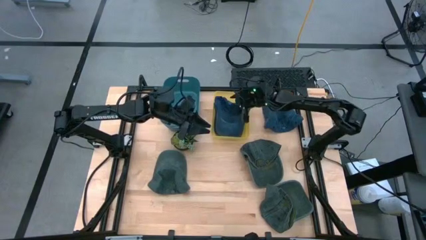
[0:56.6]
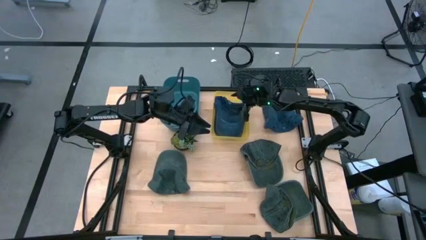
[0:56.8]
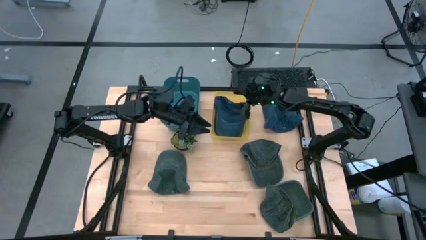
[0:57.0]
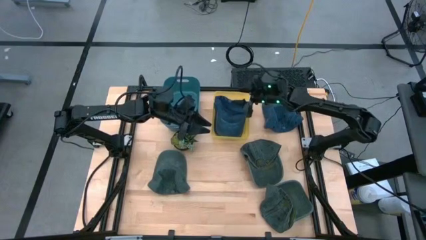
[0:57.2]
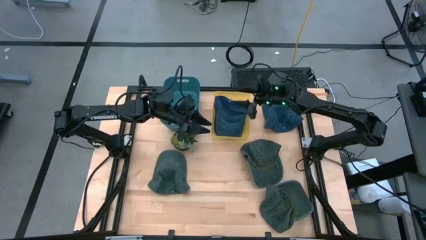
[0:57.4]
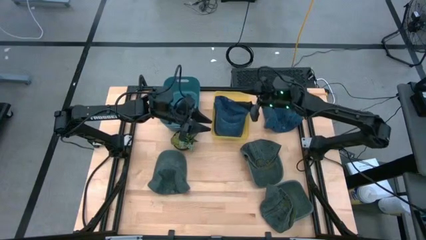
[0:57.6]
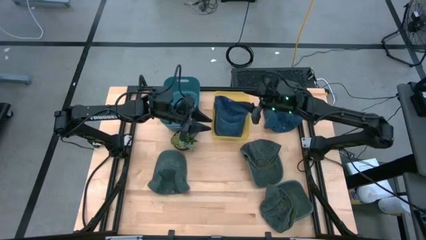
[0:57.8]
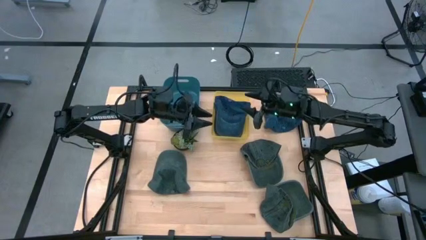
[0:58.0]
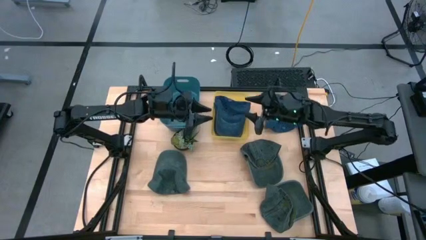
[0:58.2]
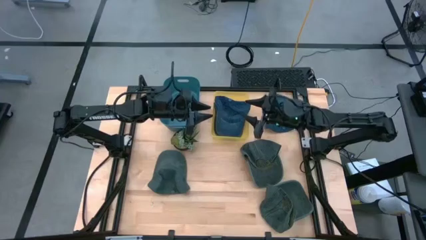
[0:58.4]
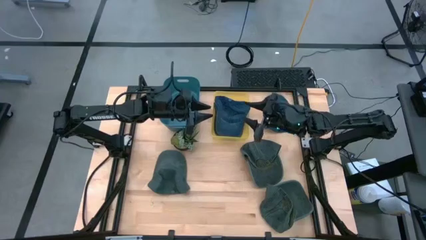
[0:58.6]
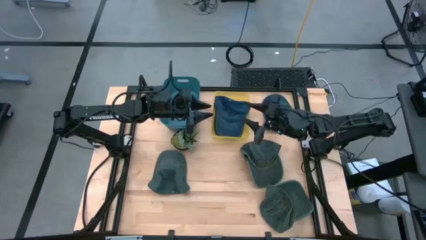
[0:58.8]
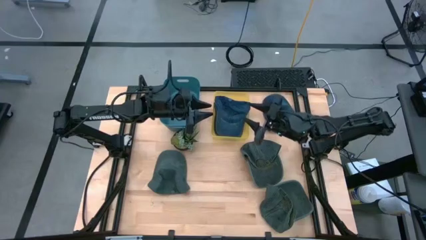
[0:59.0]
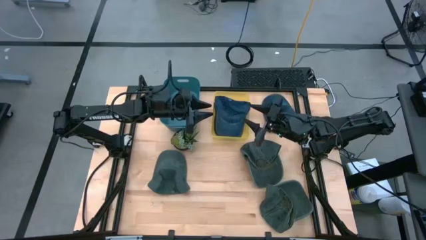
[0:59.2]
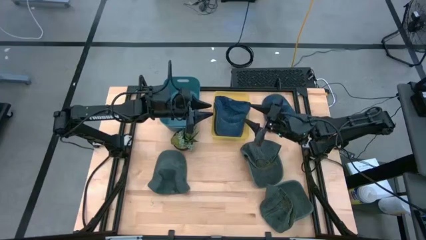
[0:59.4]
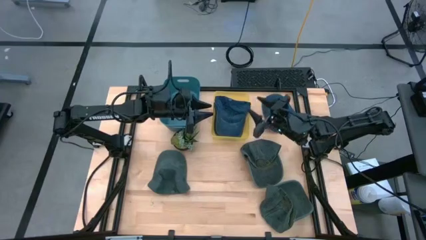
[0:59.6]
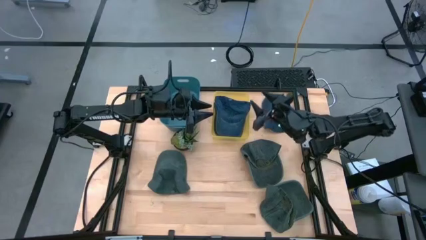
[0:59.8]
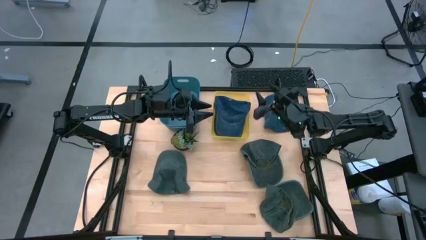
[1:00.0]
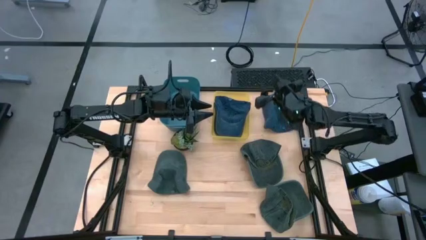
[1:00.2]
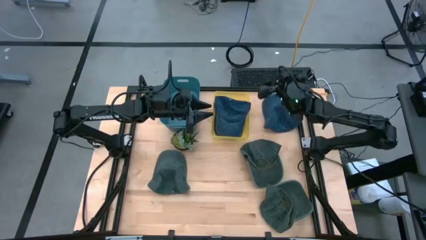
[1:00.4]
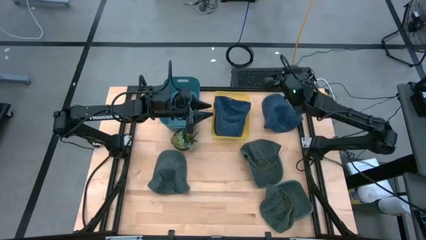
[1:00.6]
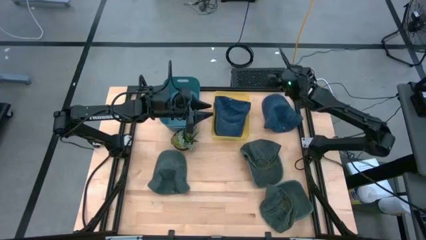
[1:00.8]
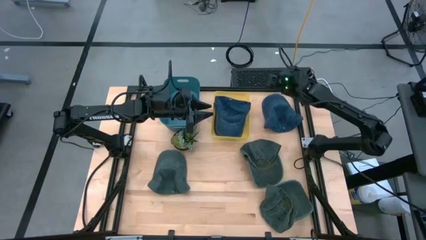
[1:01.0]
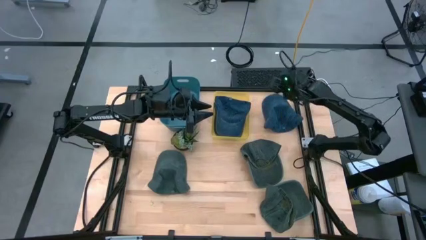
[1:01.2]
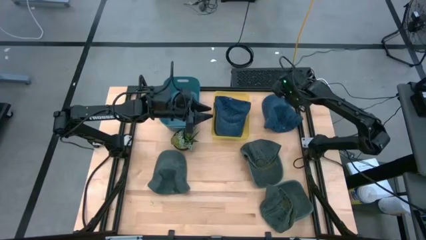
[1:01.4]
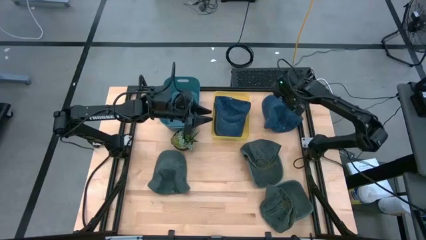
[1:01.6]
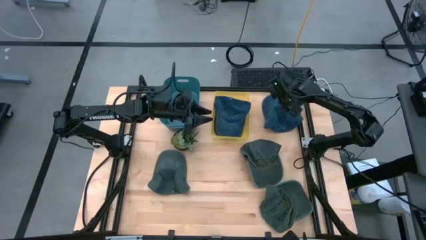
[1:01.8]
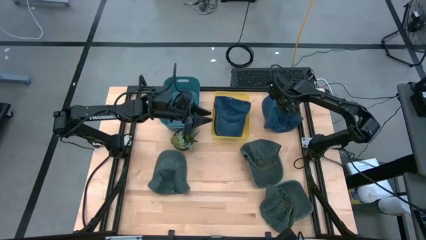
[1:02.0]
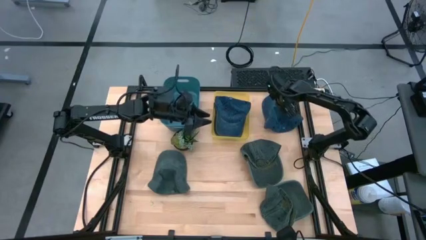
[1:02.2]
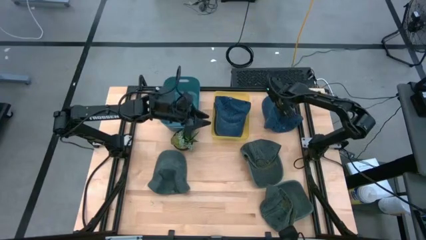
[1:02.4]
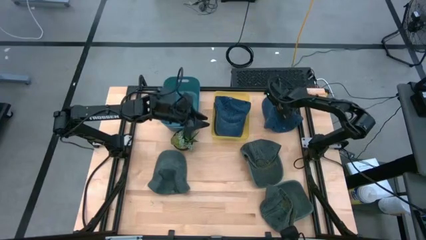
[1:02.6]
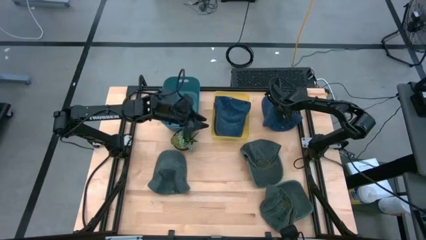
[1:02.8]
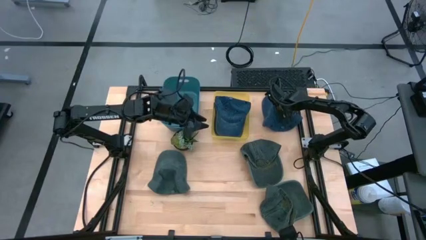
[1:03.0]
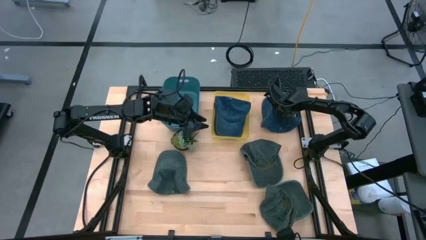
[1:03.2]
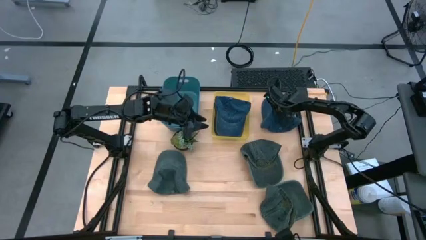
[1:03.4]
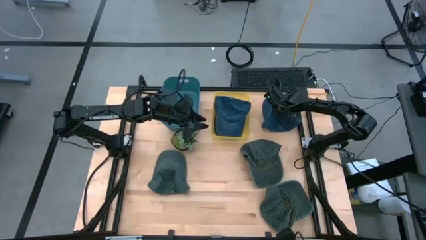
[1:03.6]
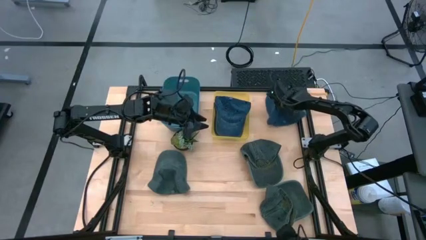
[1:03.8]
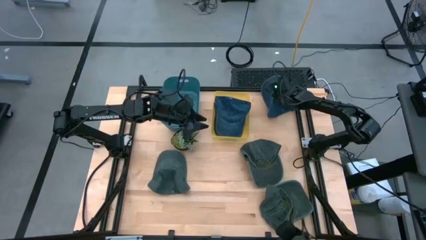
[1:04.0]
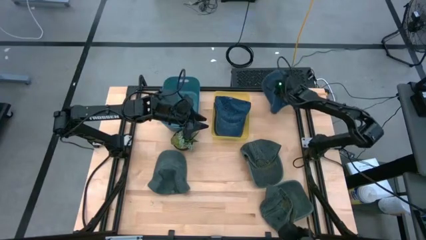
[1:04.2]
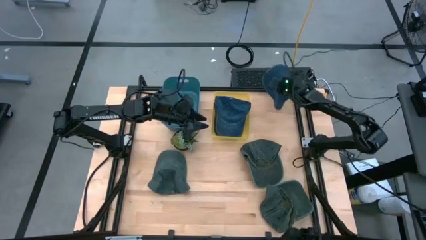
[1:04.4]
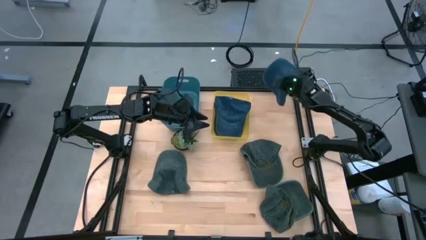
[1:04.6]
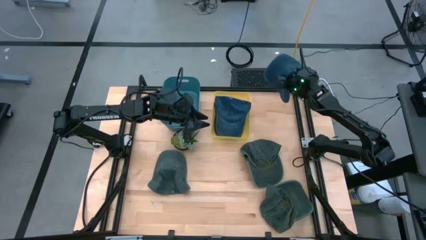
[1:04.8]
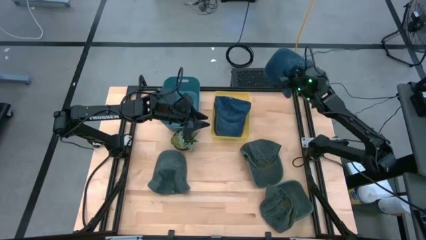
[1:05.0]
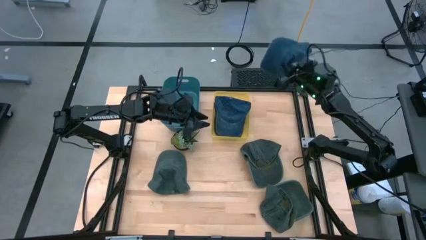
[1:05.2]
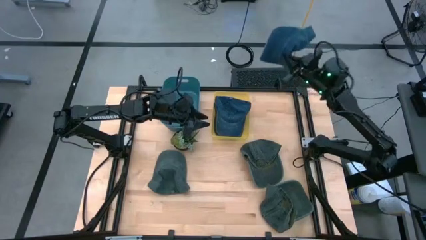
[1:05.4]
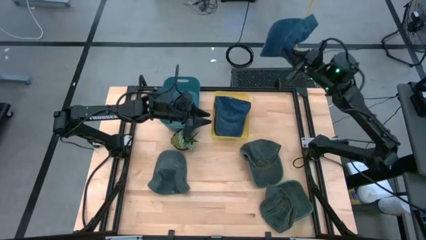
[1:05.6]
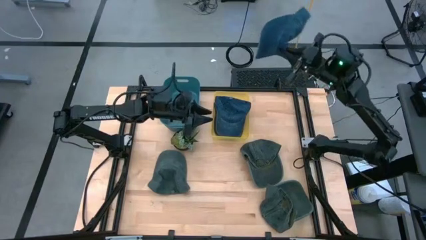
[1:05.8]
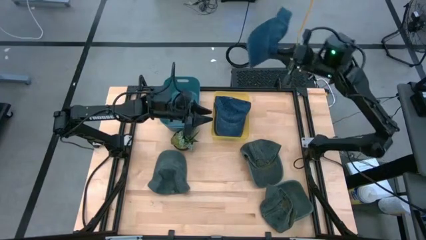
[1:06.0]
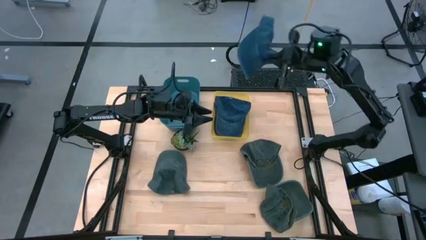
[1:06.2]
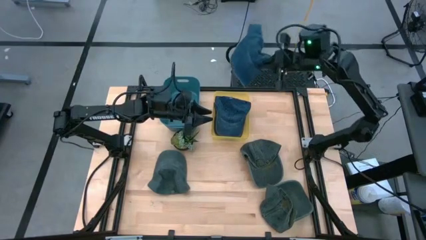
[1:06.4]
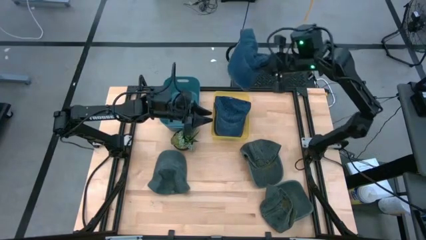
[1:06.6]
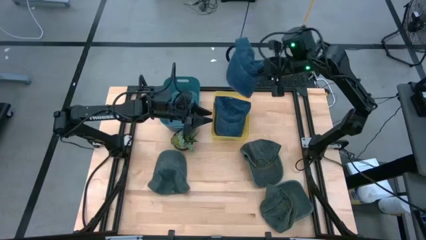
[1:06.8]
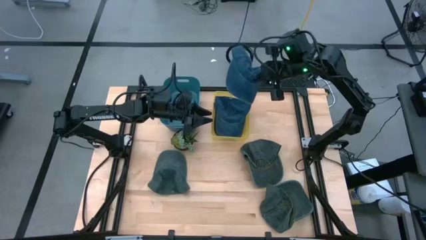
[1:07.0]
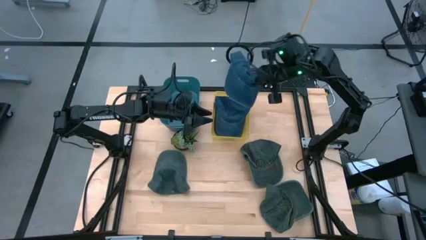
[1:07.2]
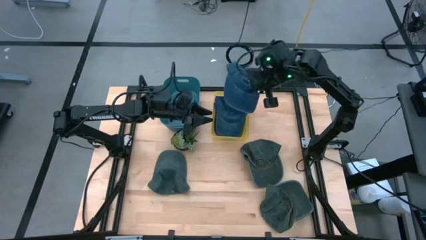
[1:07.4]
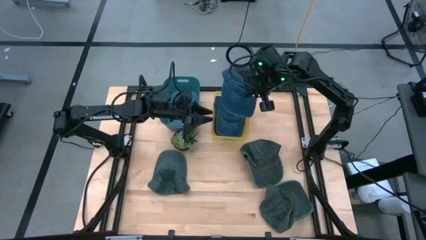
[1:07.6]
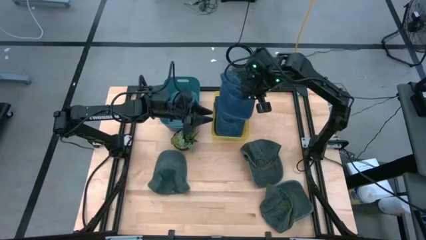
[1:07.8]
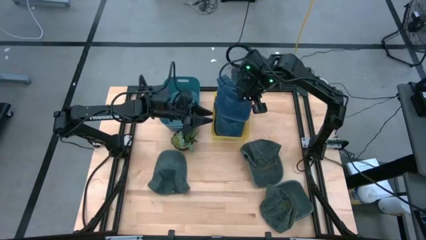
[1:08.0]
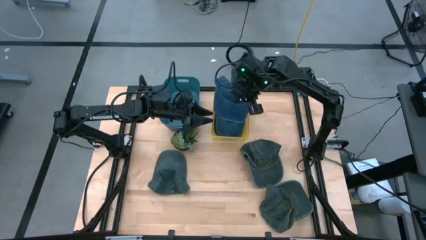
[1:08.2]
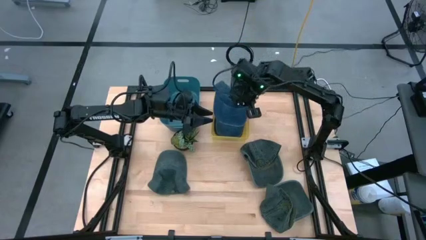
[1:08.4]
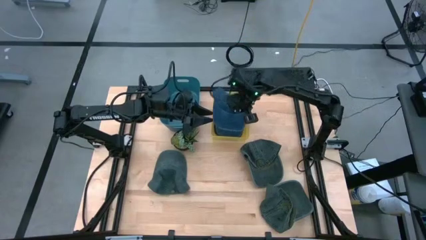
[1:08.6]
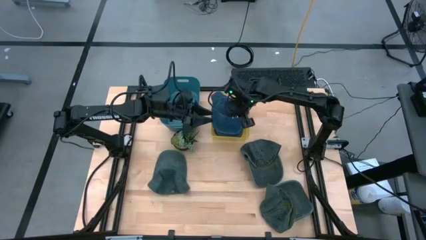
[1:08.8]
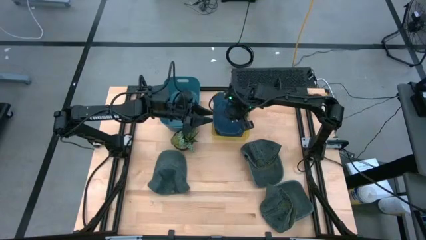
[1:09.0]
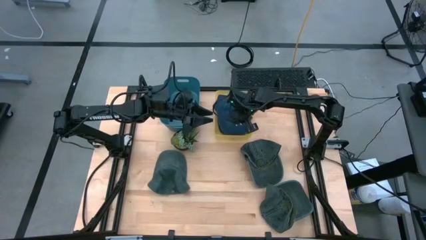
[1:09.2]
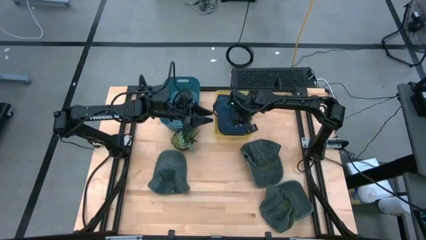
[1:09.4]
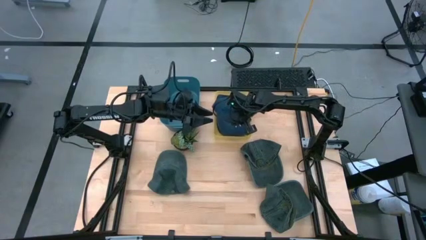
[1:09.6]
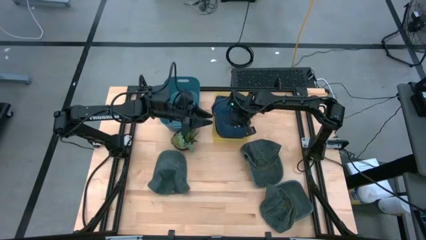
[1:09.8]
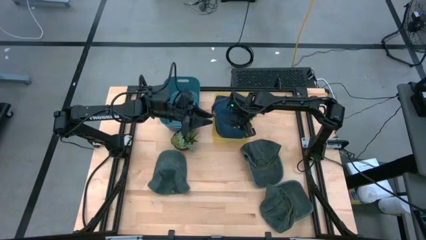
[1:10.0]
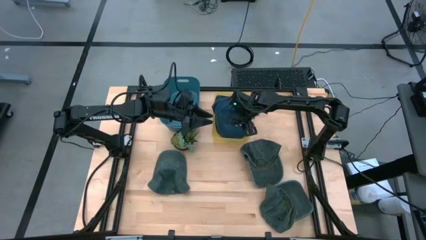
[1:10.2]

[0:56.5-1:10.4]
Task: Pick & Place hat
Put the blue cap into the yellow bin

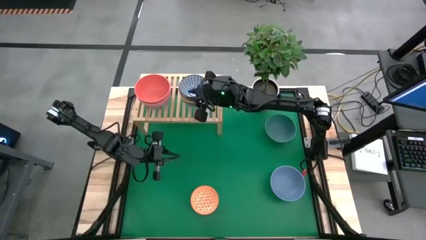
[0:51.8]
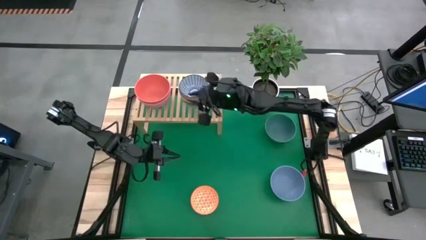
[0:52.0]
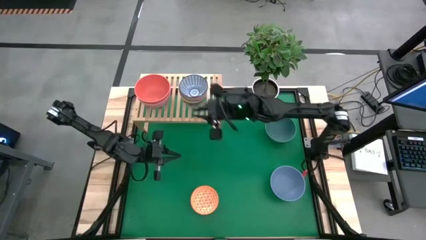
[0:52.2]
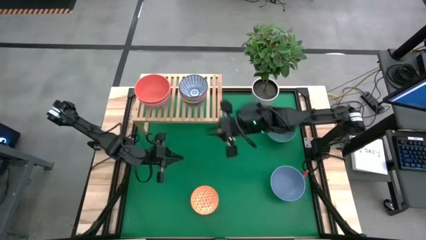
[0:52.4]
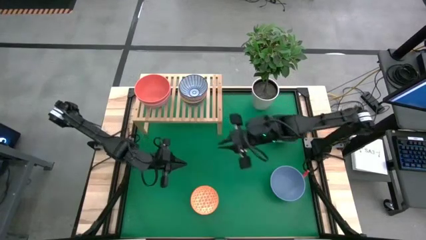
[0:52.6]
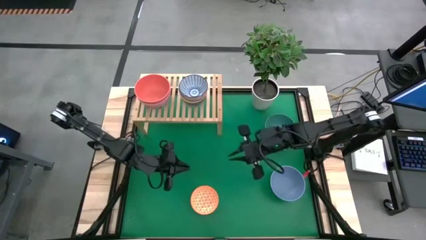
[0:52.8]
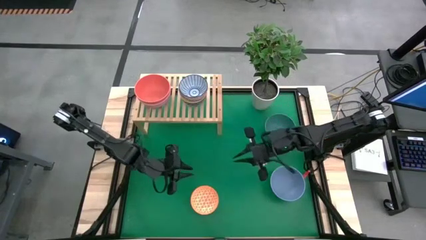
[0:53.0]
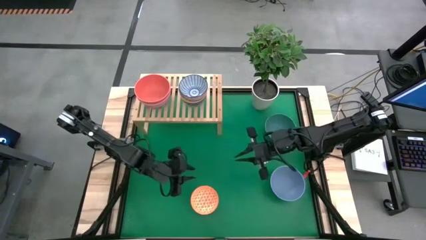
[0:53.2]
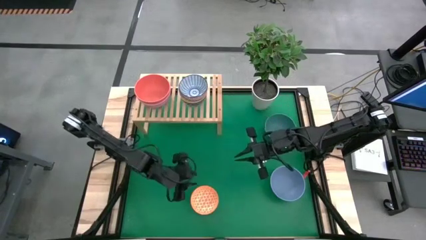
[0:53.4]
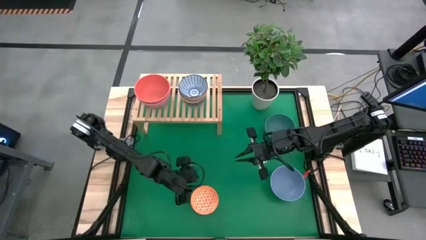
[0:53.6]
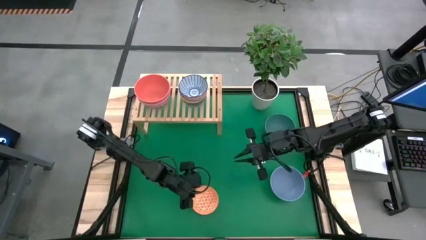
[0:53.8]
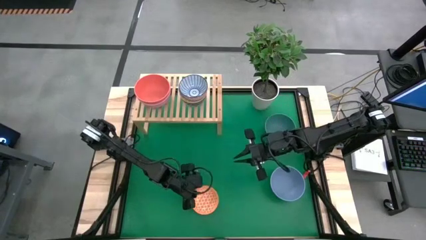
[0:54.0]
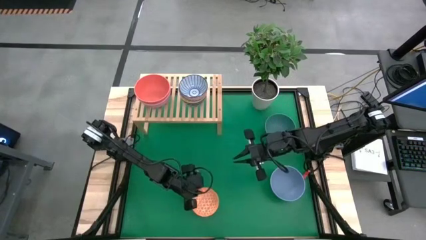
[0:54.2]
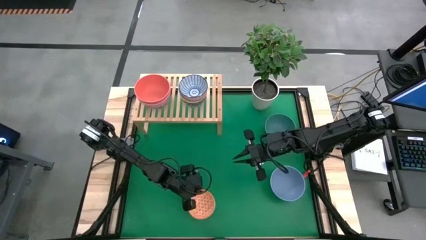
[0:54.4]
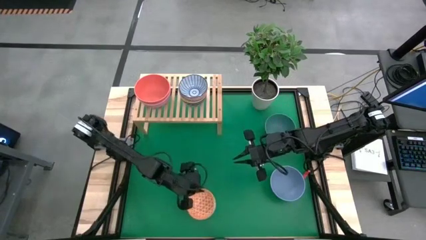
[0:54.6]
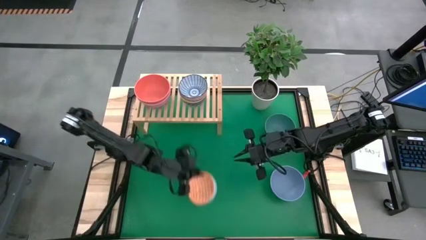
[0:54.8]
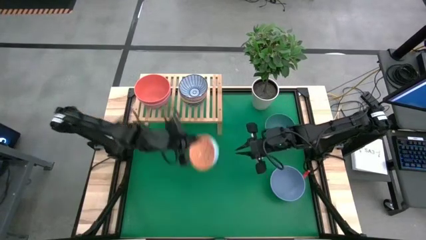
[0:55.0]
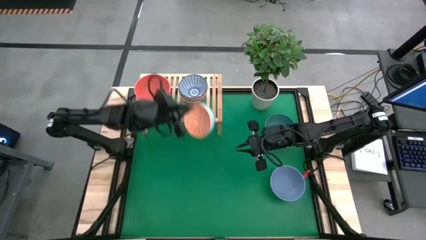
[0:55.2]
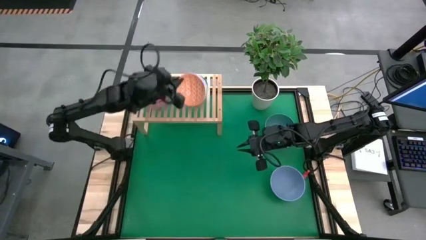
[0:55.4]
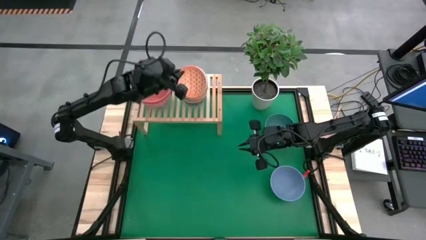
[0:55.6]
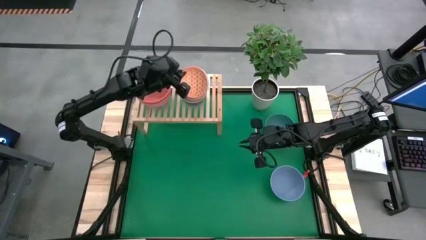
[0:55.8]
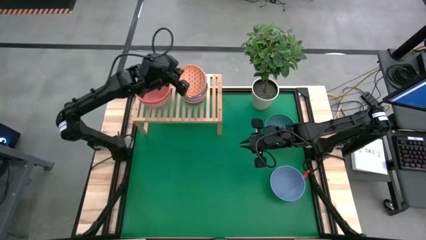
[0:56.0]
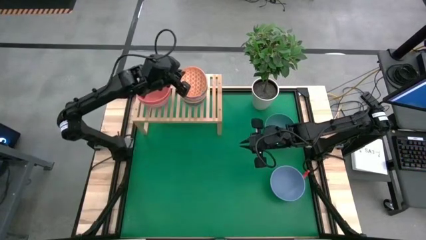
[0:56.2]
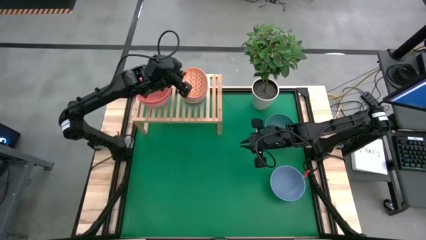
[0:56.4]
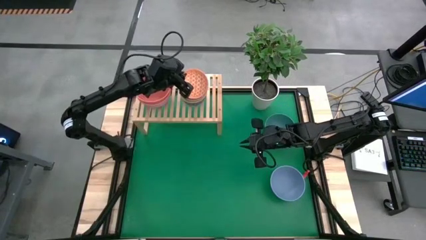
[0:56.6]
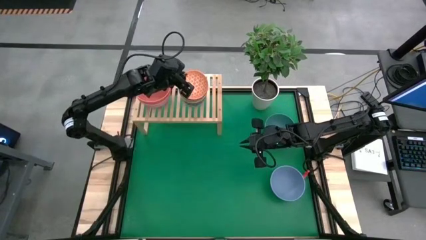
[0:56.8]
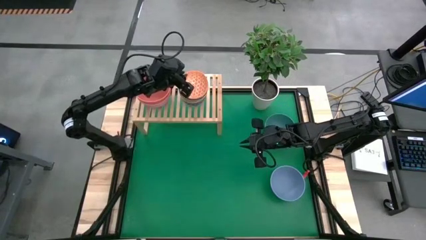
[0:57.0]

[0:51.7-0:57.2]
Task: Place and stack bowls onto a shelf
Stack the orange patterned bowl on top of the blue patterned bowl on the shelf
